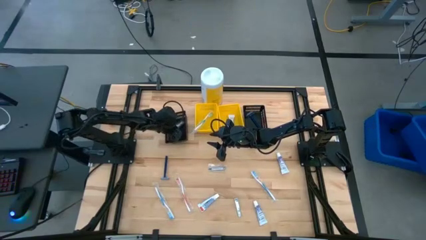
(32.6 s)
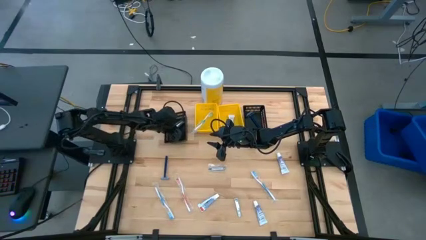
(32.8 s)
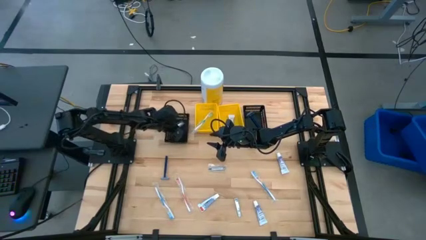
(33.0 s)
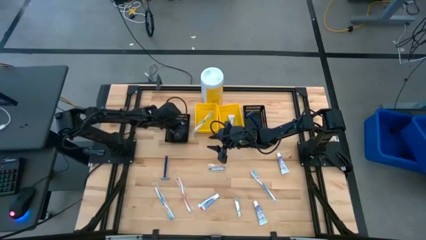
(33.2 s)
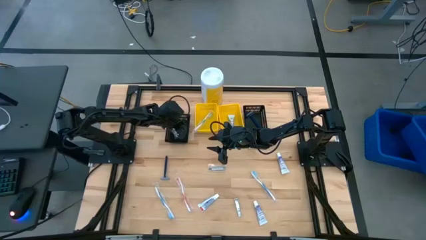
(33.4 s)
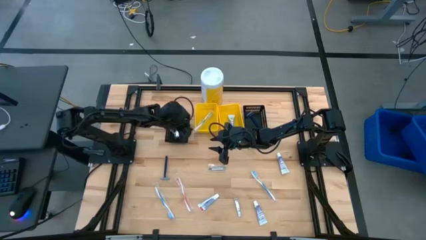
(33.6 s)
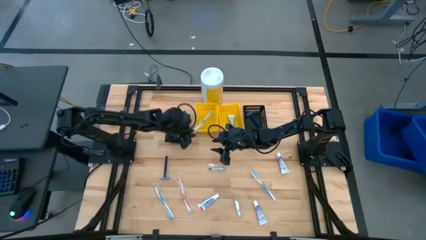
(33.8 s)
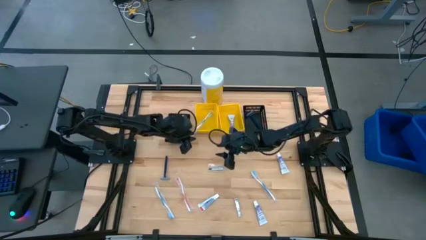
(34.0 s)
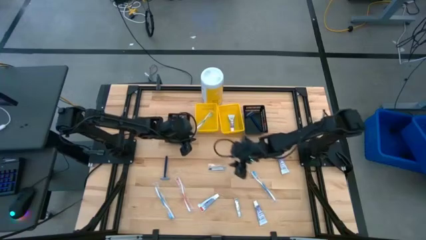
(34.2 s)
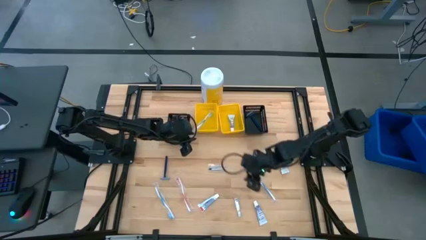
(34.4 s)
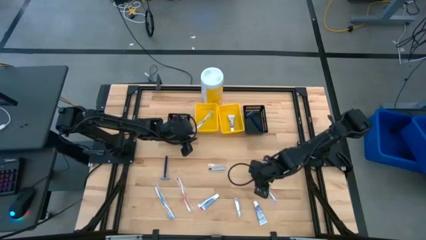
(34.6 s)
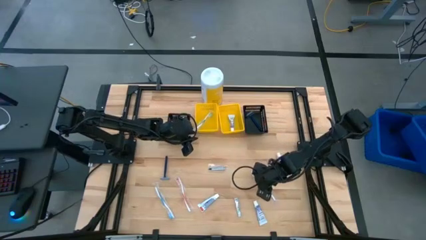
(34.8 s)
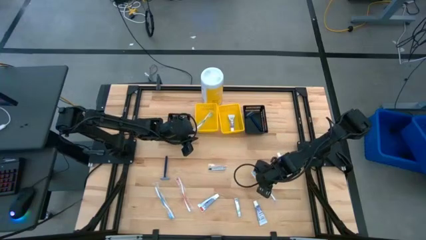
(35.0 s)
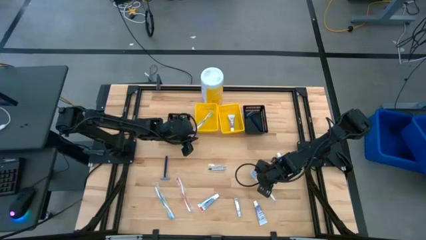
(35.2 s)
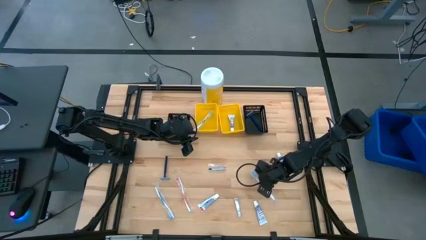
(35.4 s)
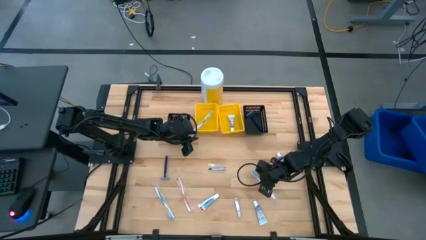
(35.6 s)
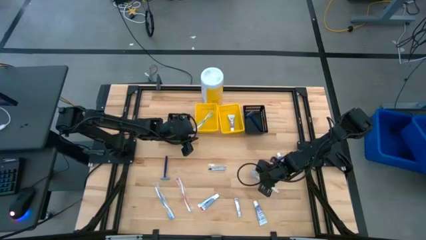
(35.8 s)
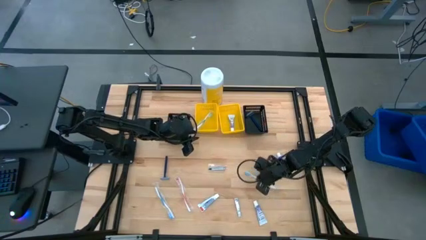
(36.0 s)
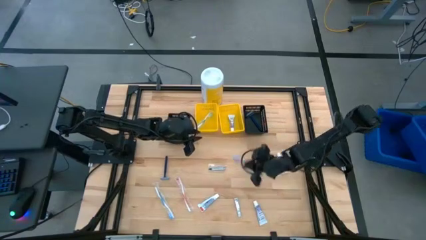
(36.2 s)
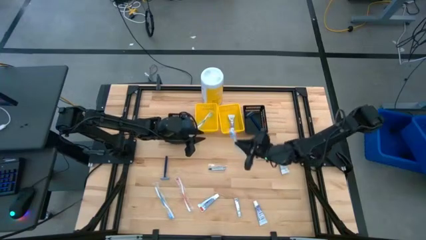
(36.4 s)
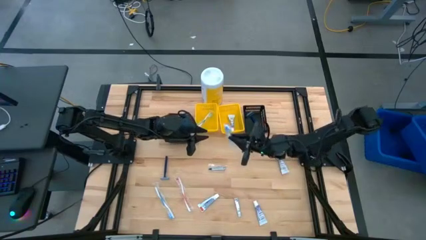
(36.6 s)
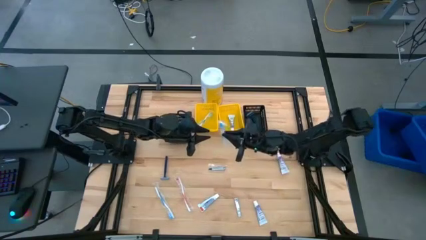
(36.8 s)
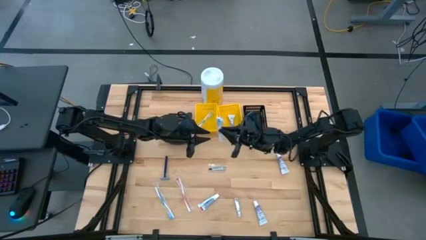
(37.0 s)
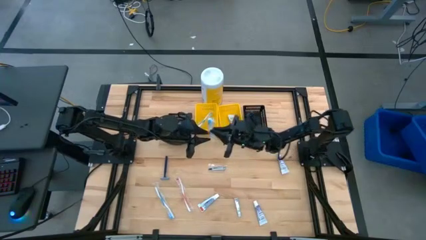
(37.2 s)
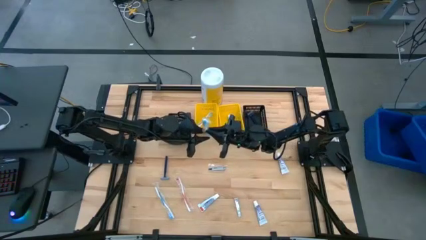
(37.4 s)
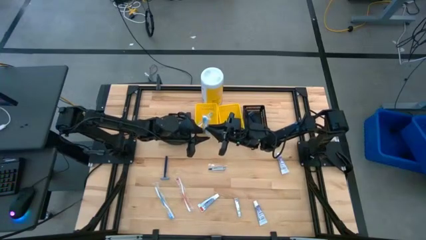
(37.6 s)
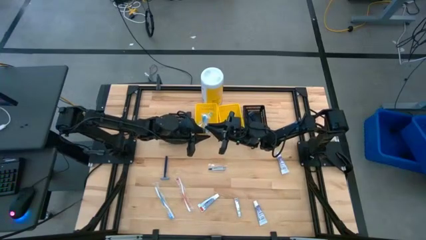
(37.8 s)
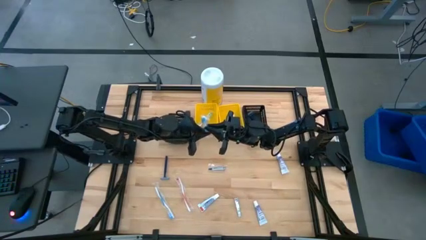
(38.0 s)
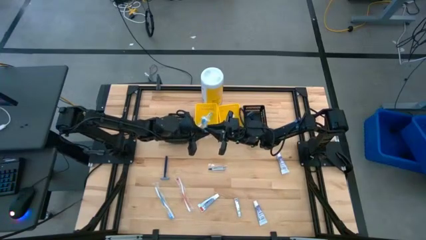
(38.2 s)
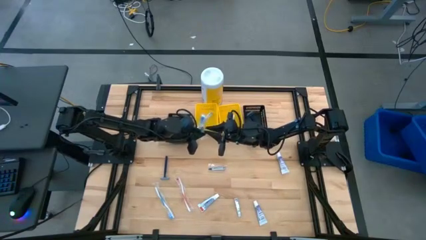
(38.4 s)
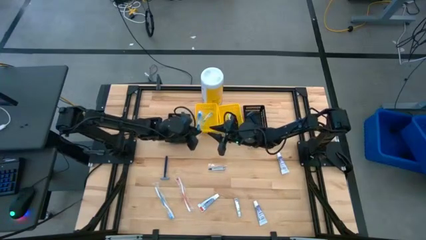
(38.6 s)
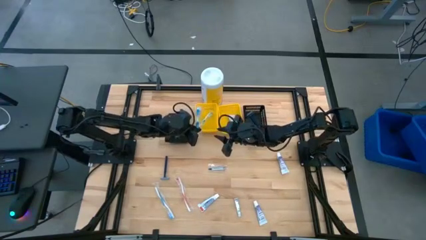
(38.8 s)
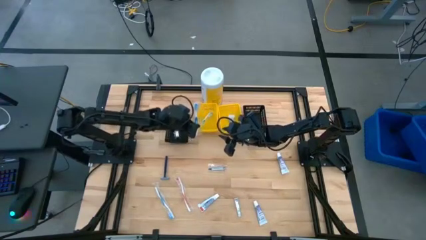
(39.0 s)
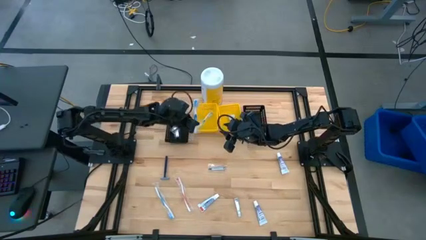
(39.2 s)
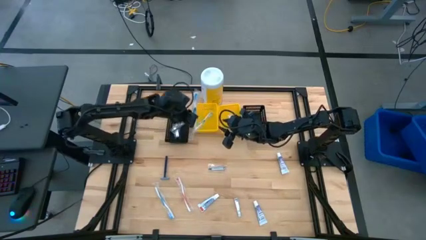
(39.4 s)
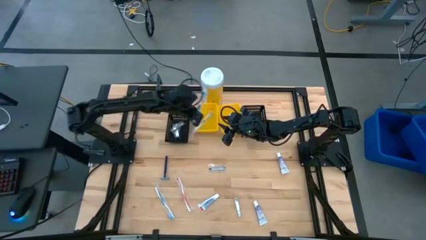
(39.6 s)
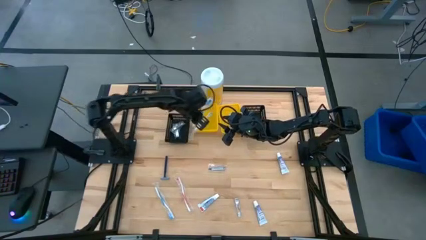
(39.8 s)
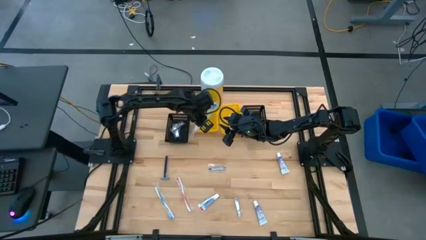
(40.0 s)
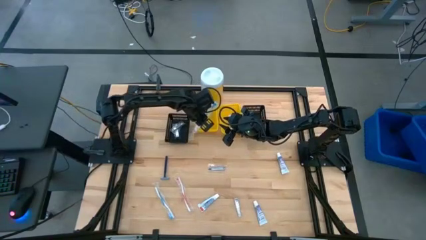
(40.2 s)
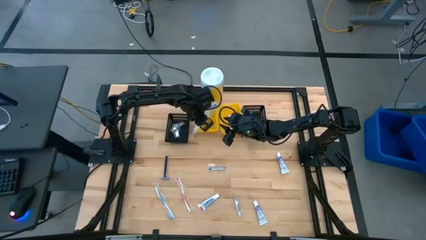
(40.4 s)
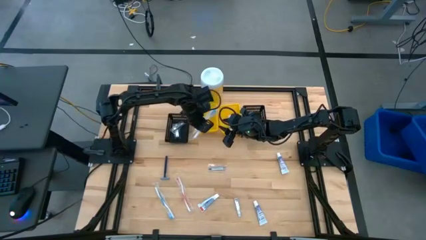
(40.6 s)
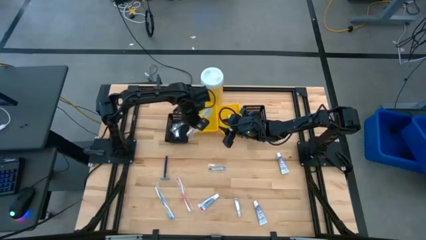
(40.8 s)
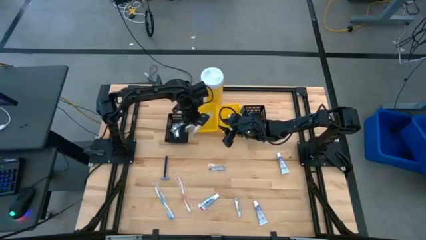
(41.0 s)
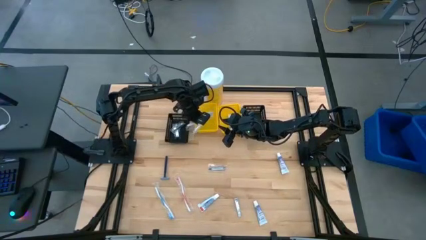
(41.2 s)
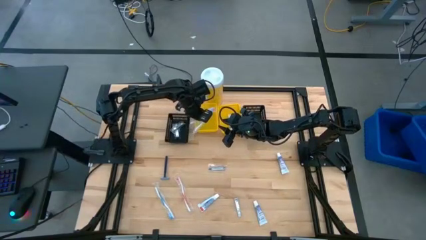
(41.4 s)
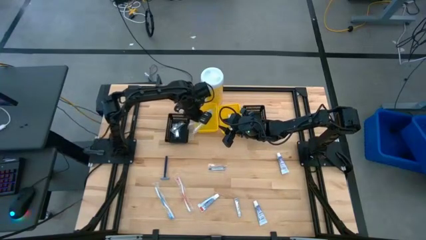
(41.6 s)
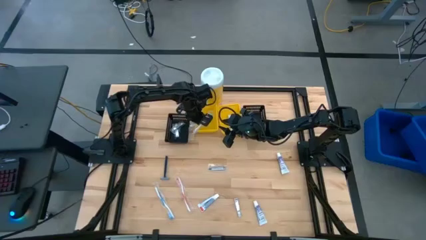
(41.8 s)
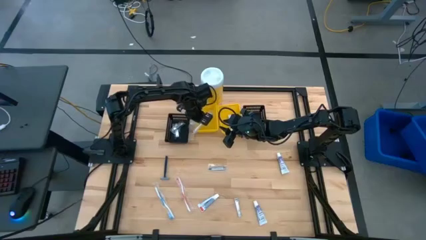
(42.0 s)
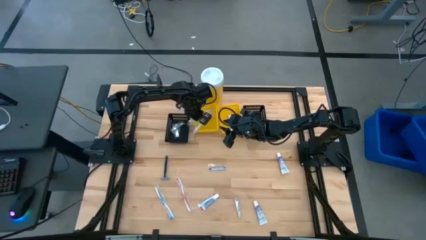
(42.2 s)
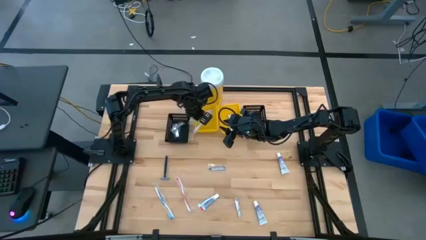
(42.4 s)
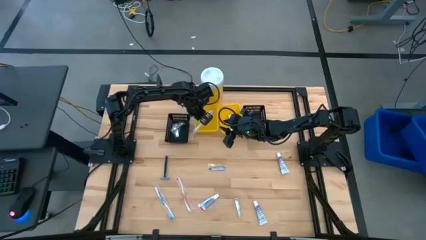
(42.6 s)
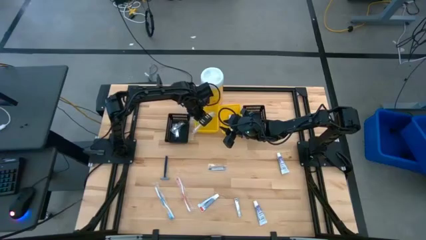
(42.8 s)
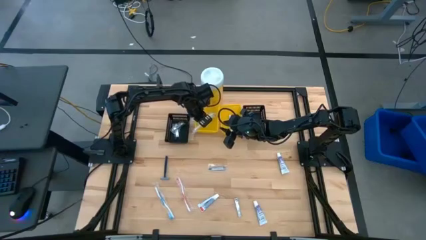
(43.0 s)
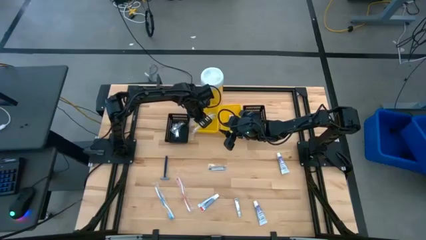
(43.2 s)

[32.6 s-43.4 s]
Task: Pick & Place Travel size toiletries
Put the blue toothbrush into the left yellow bin

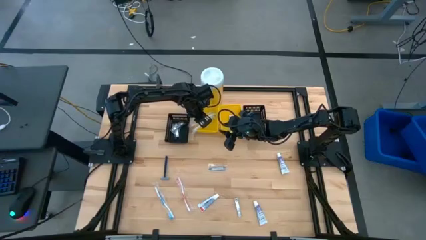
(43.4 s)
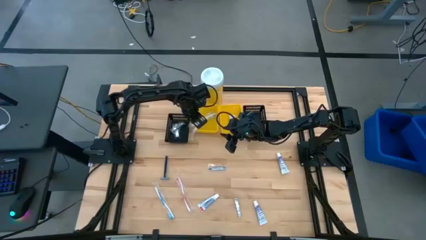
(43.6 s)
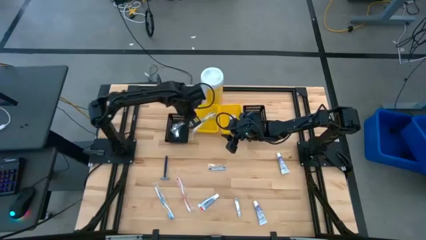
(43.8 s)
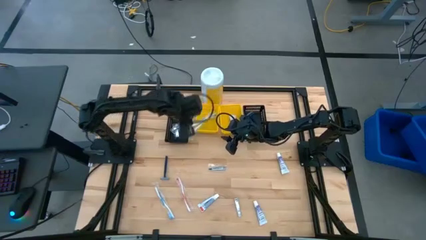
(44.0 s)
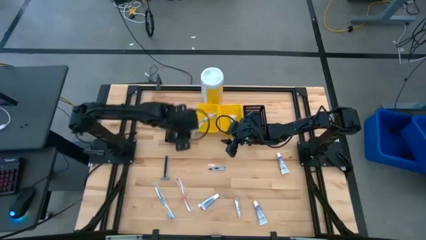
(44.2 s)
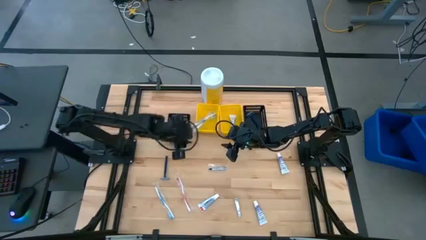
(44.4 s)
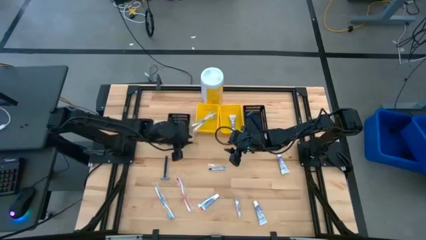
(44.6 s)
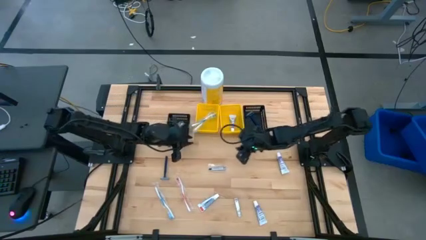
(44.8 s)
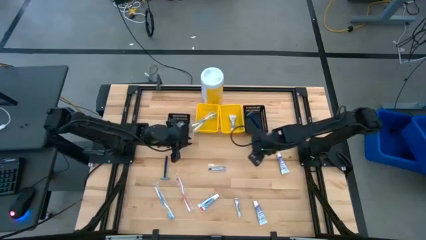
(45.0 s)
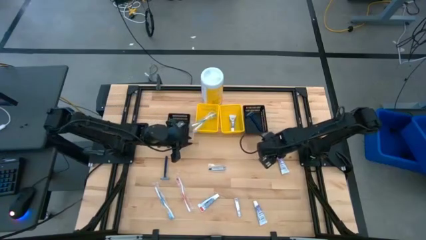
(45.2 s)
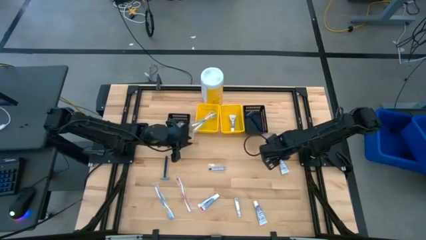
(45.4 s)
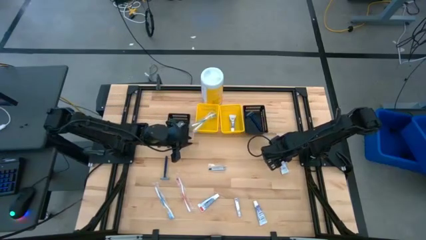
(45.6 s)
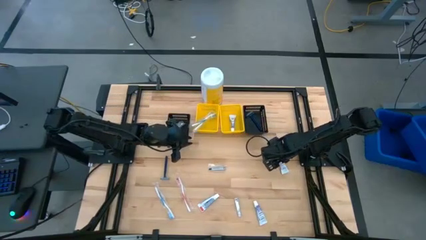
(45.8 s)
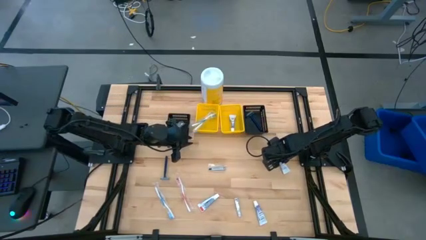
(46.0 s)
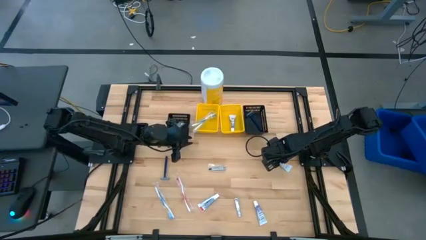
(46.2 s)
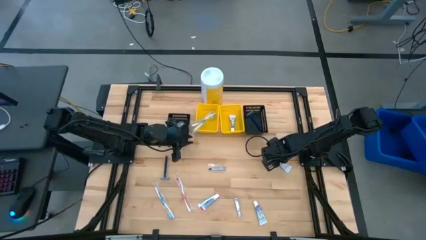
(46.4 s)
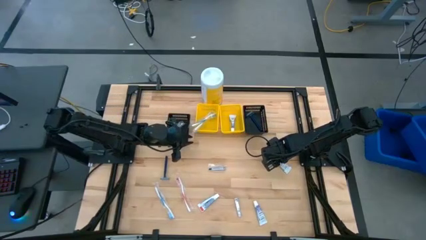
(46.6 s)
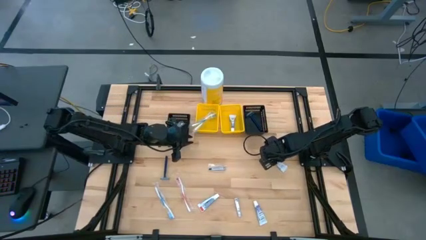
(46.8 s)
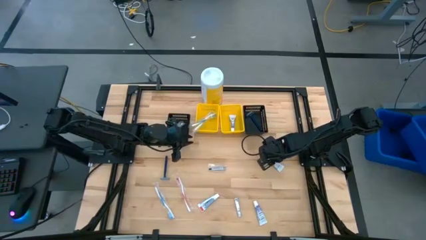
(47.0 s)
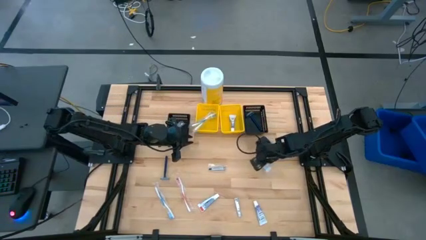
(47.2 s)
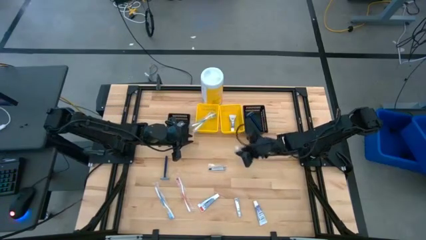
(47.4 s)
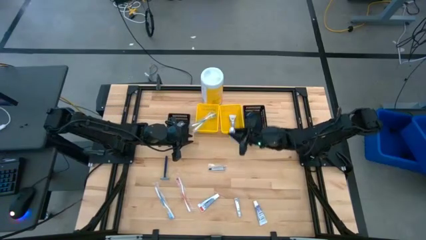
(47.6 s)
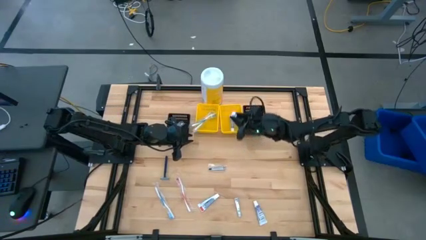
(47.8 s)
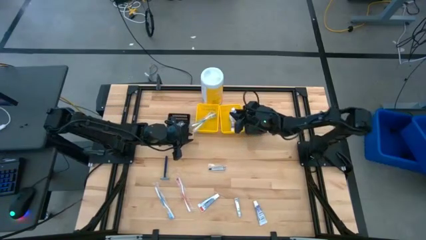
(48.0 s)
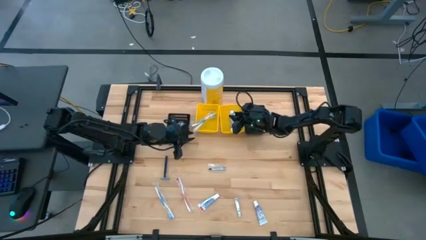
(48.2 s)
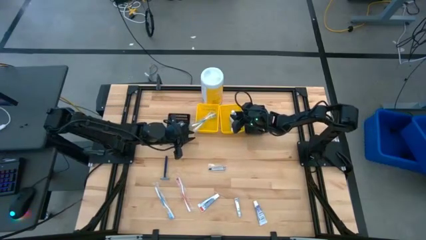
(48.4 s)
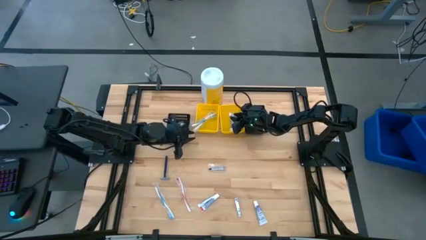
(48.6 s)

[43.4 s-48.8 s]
Put the white toothpaste into the right yellow bin

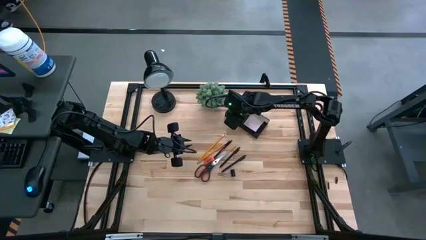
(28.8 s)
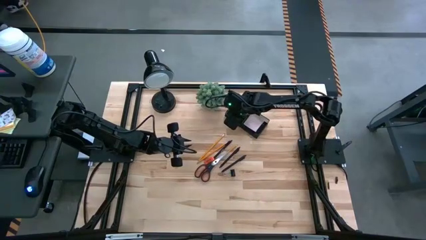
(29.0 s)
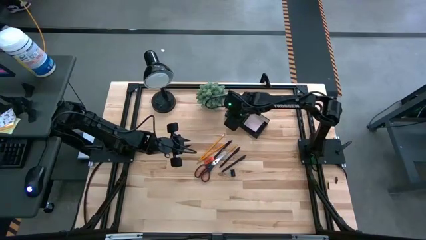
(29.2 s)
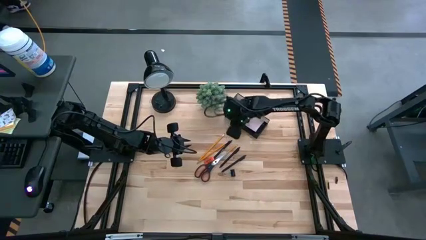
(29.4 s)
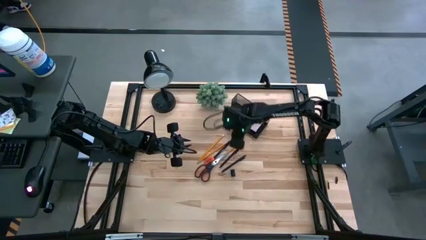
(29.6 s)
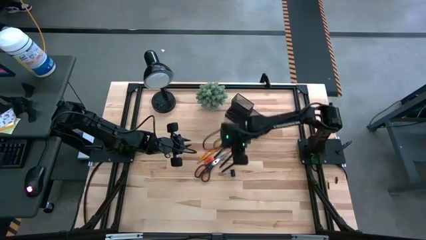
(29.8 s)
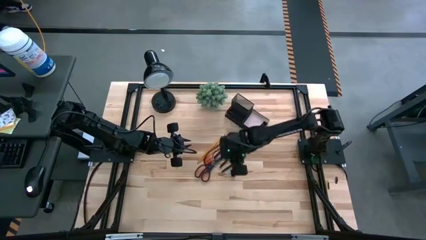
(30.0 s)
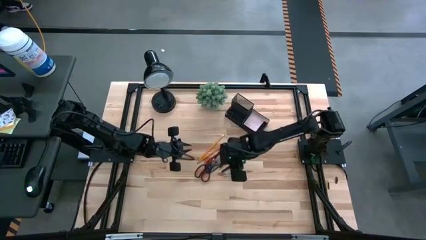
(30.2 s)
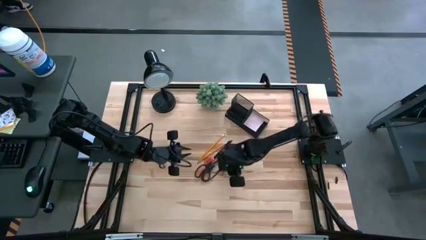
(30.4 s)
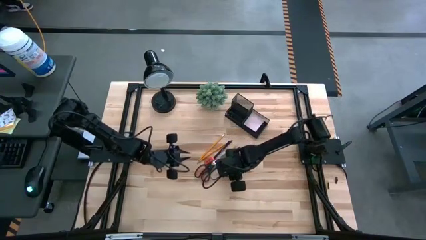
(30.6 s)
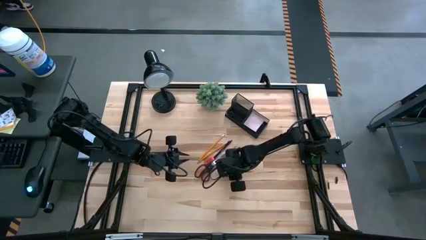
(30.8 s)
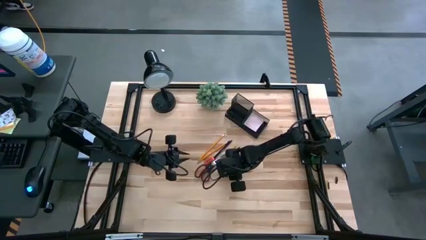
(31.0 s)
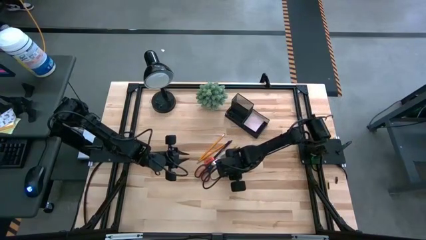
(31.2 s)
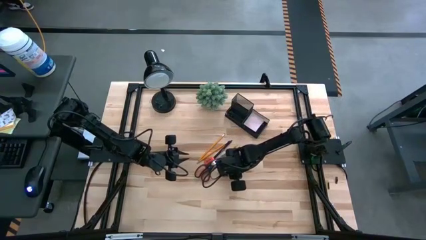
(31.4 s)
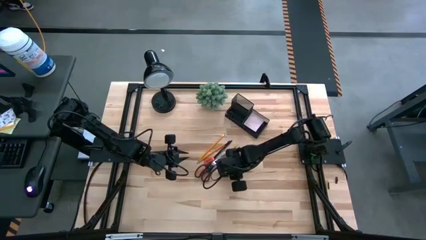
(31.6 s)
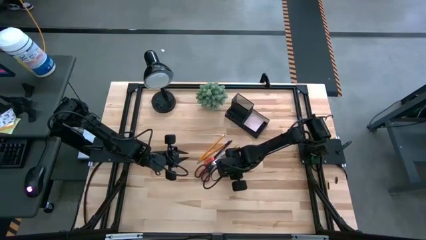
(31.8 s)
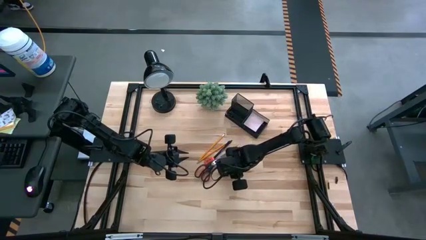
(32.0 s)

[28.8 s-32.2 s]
Task: Pick and place office supplies into organizer
Put the black binder clip into the black desk organizer
